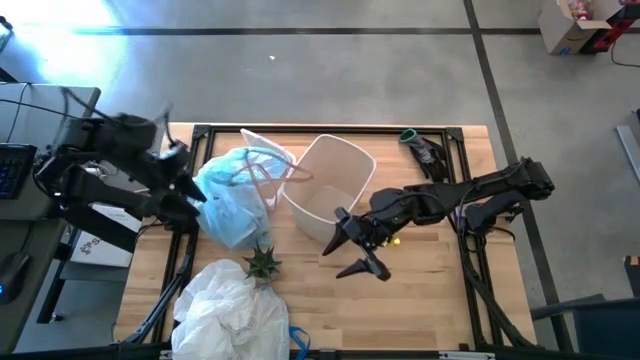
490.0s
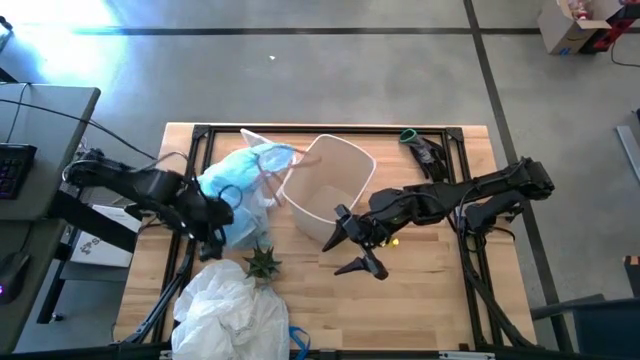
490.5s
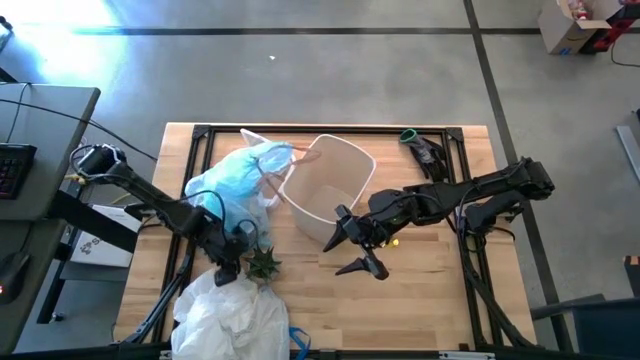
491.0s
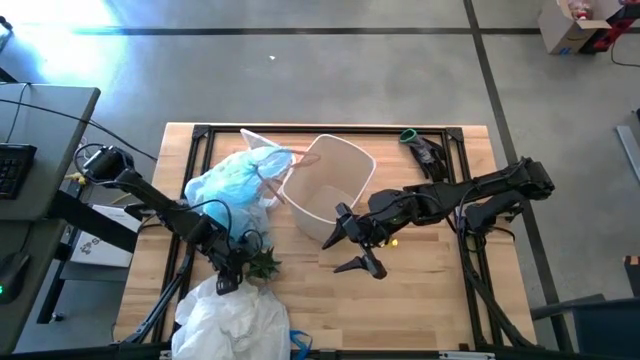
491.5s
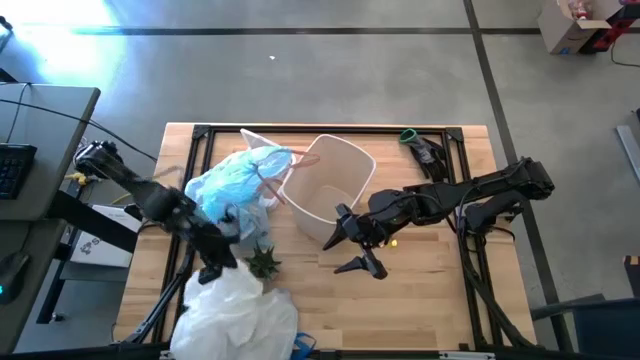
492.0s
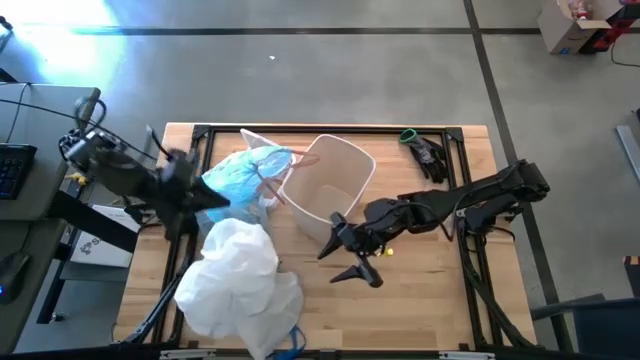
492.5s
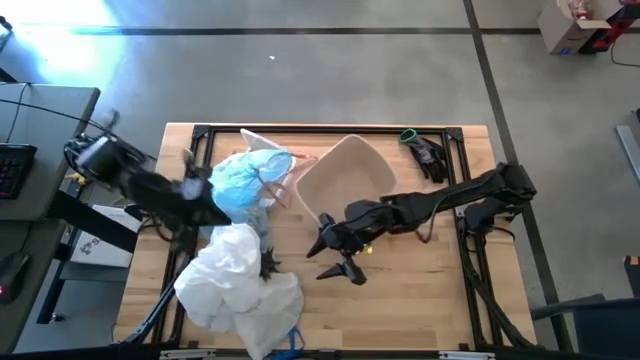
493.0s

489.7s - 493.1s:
Task: place trash/remove bag and relplace
Insert the new trash bag into the trash bin

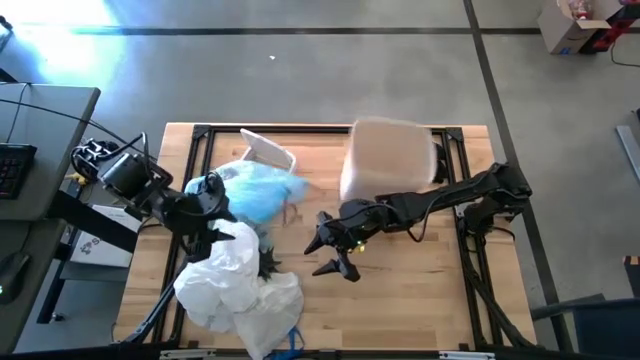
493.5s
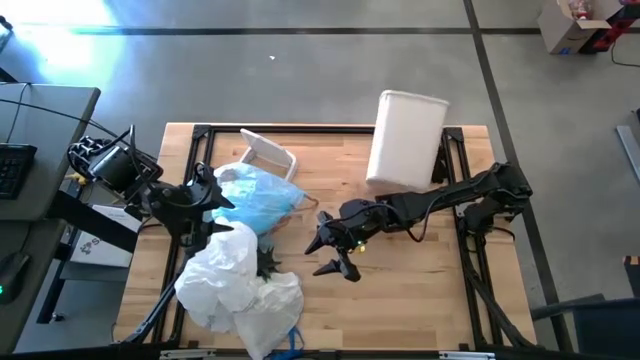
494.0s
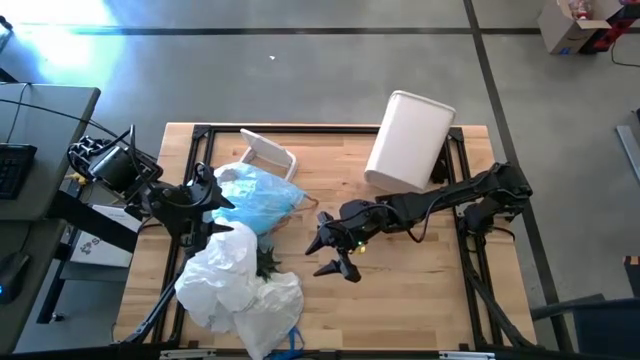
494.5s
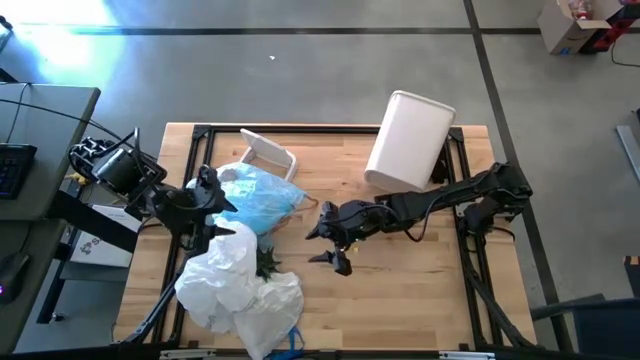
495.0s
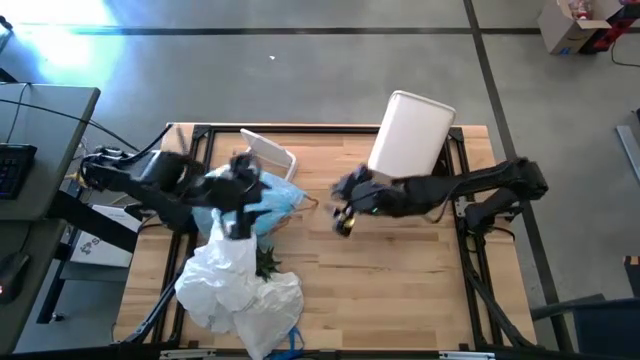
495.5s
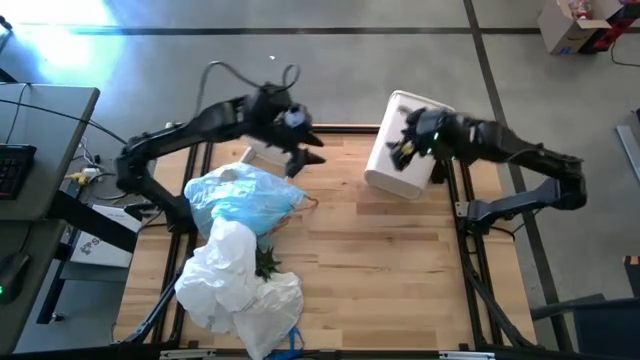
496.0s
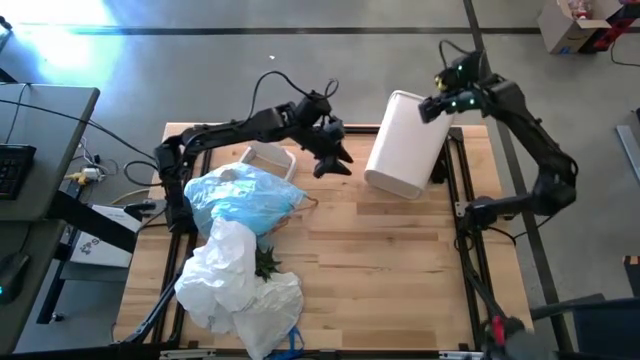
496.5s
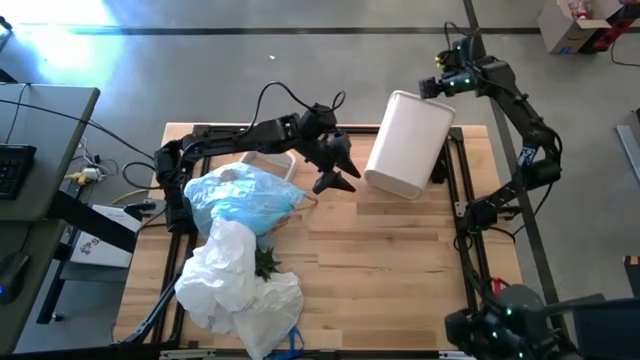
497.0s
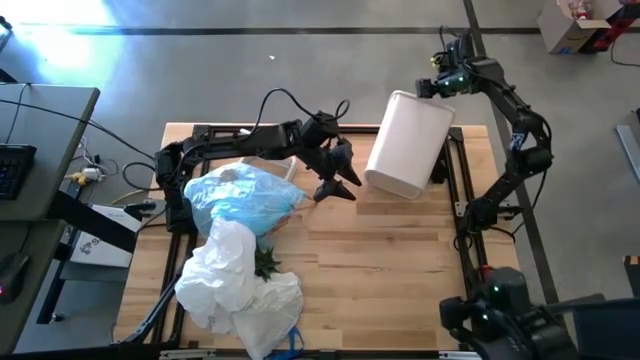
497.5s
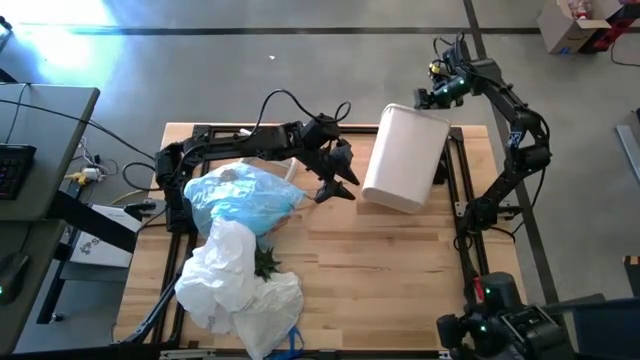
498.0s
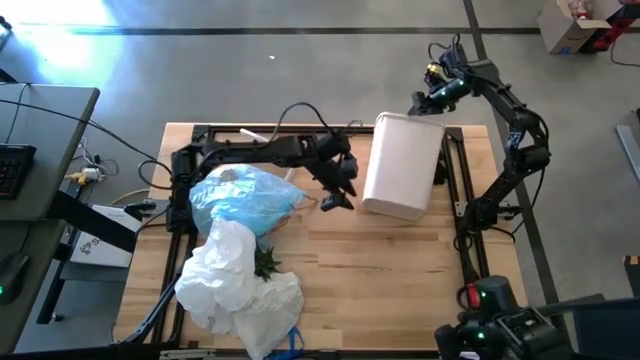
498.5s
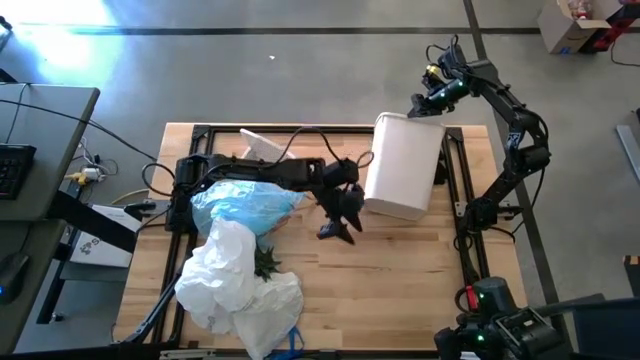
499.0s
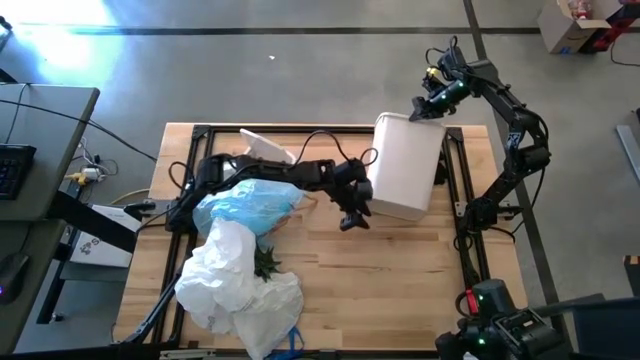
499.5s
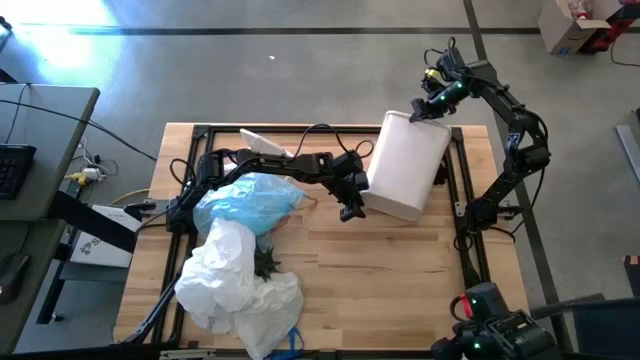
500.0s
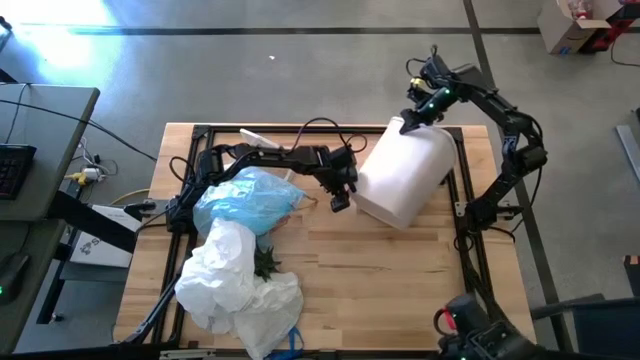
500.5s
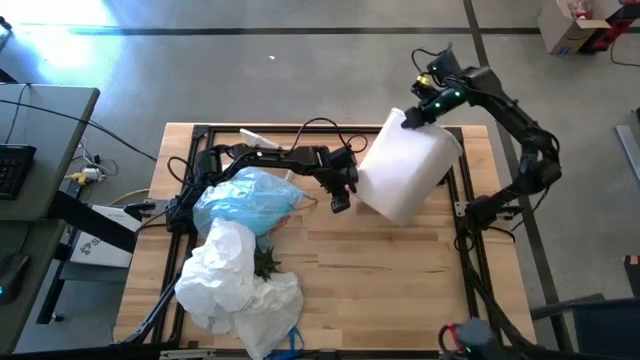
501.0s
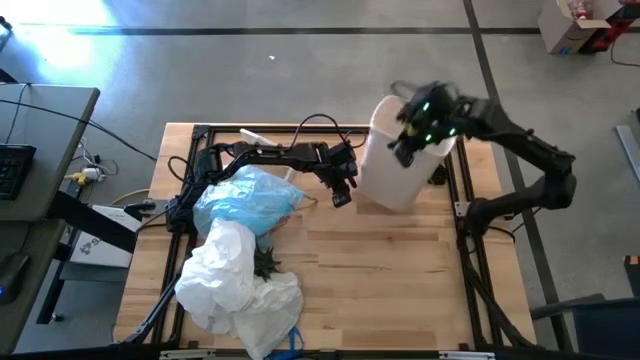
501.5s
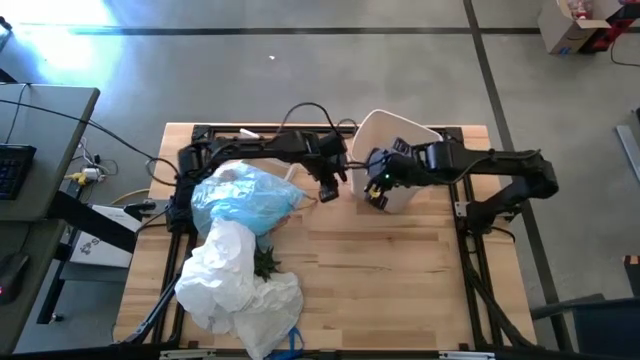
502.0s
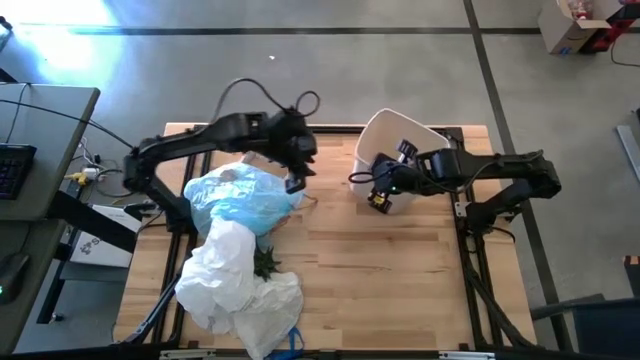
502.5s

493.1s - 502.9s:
Adjust the trash bin

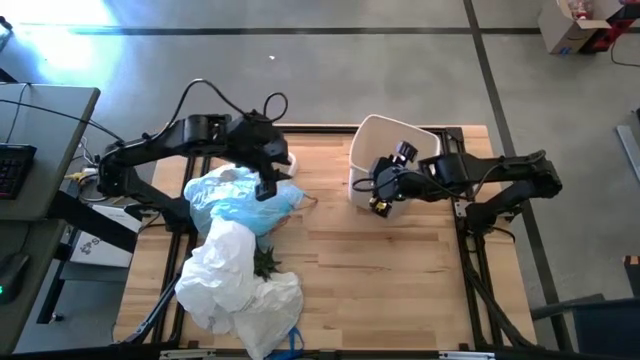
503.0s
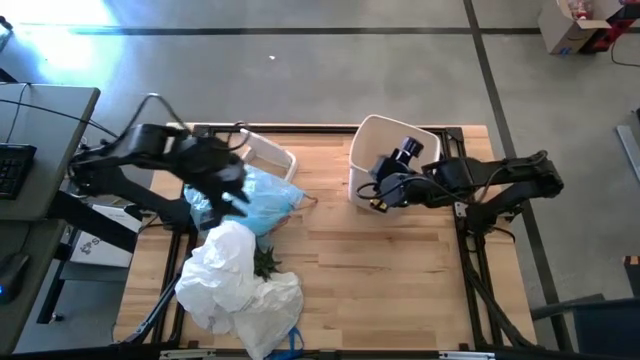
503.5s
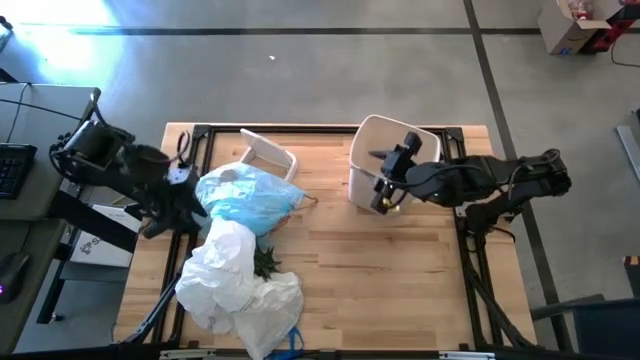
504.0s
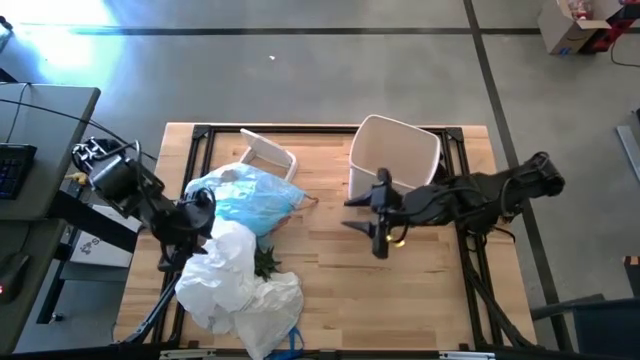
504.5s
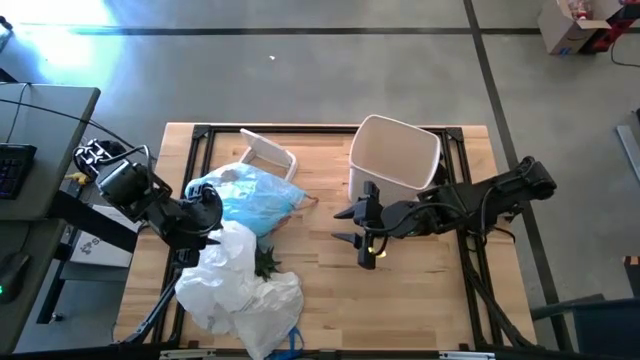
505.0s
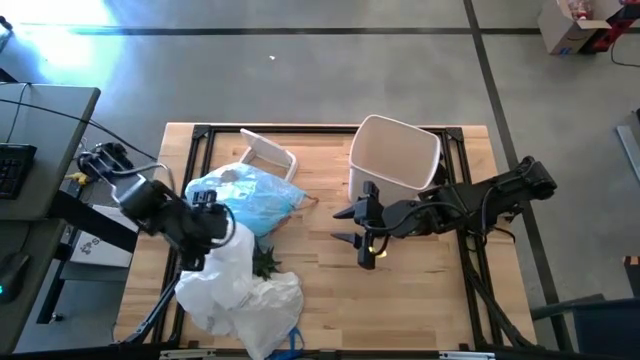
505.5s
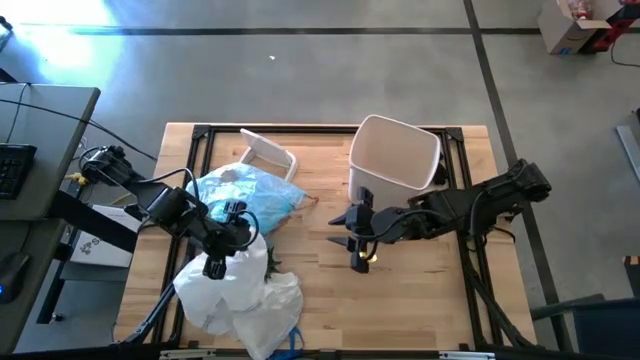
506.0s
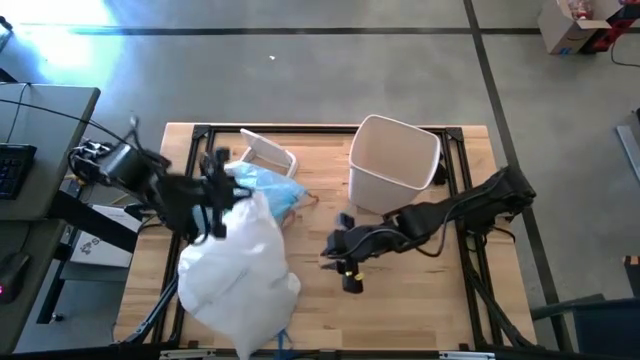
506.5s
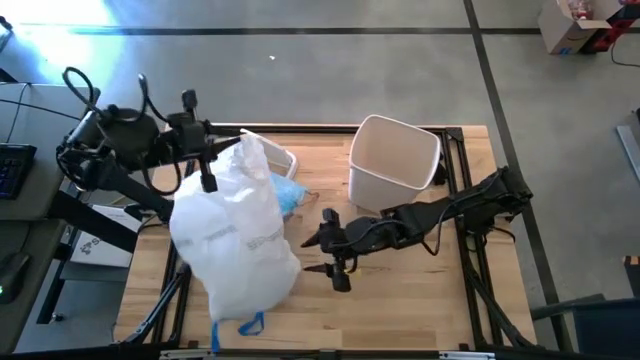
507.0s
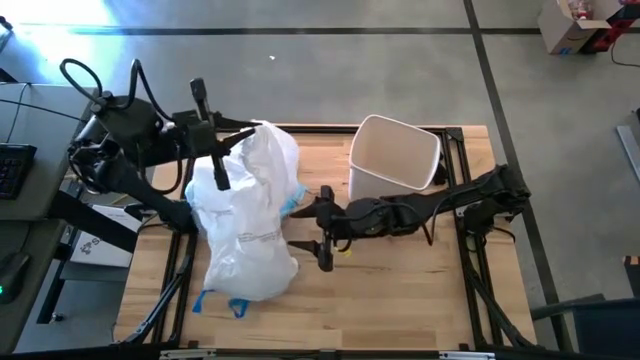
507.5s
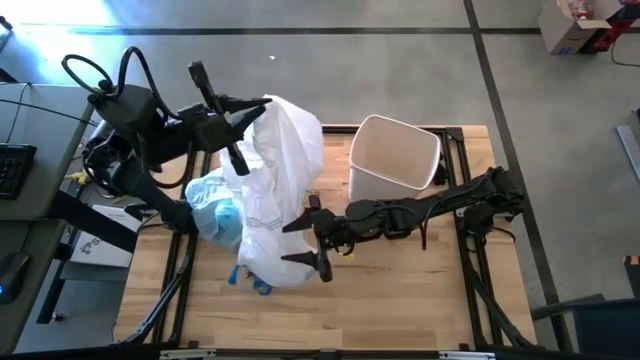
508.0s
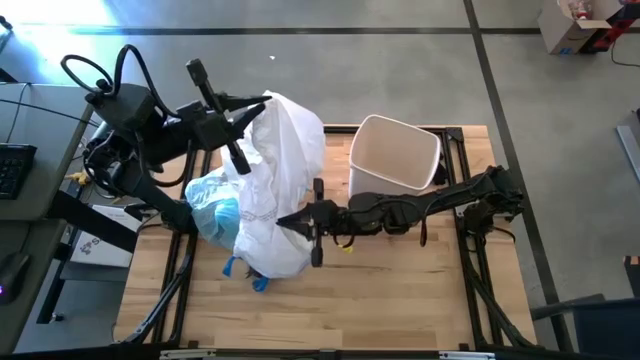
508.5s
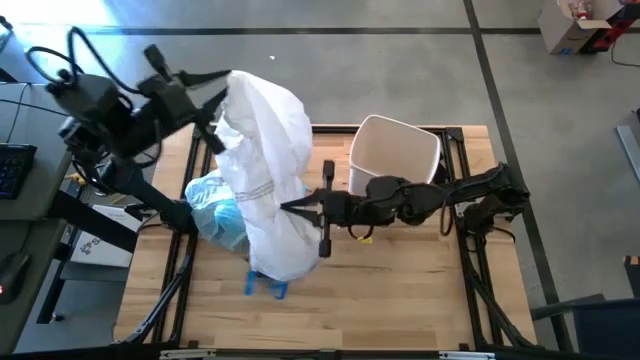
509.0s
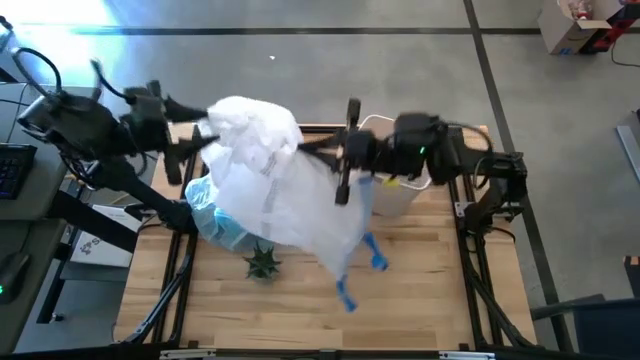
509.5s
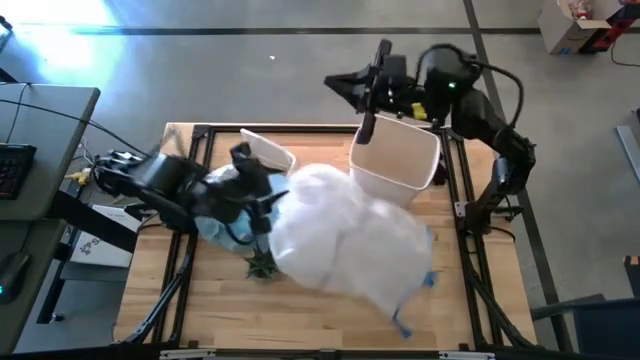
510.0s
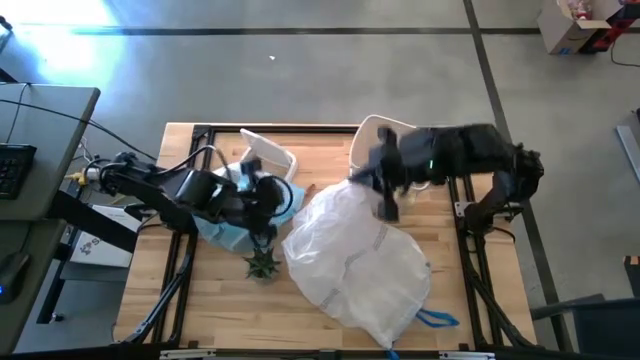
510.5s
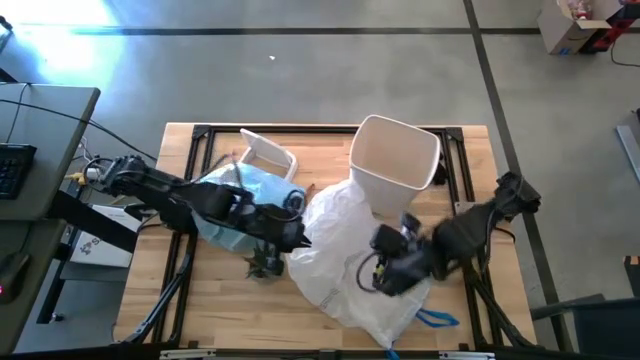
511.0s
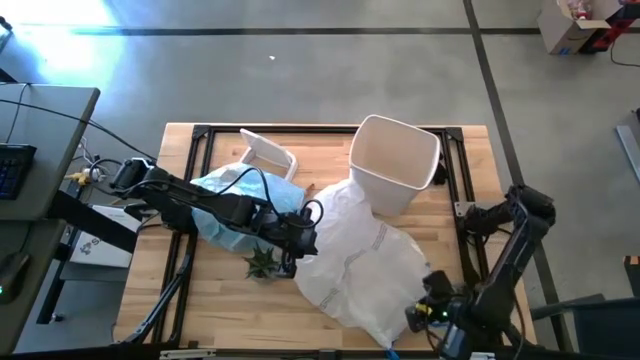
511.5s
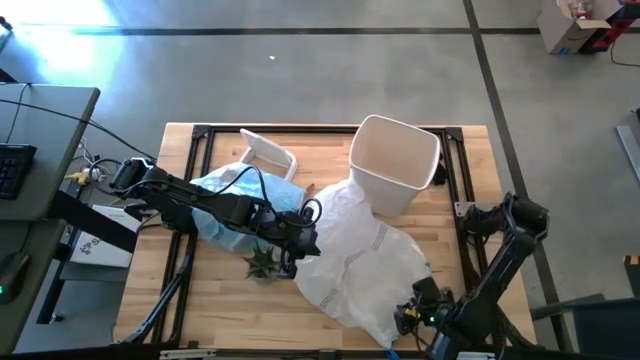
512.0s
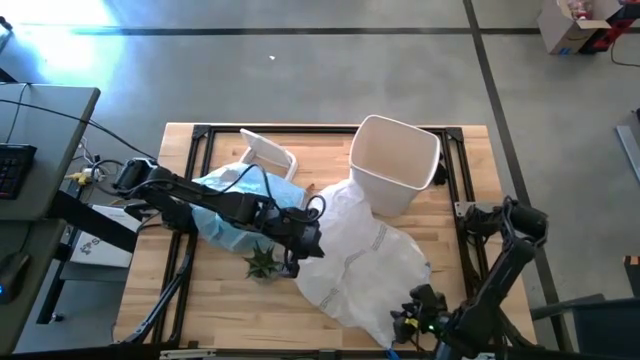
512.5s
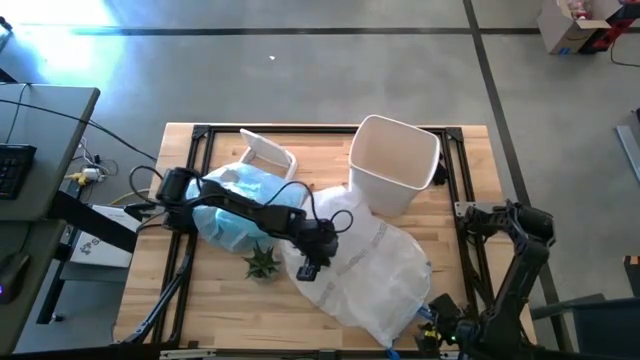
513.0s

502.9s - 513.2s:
Insert the new trash bag into the trash bin
